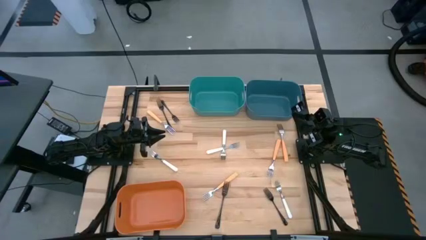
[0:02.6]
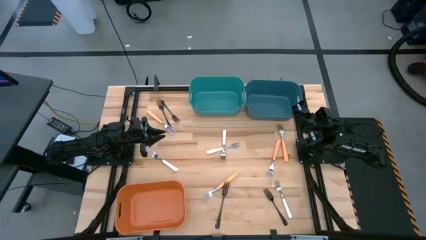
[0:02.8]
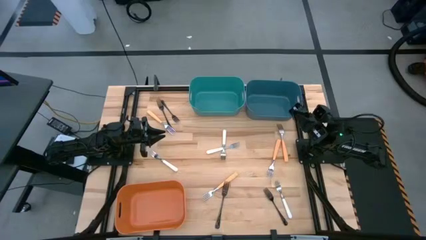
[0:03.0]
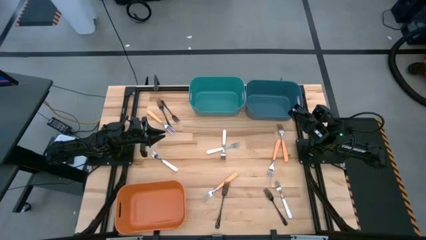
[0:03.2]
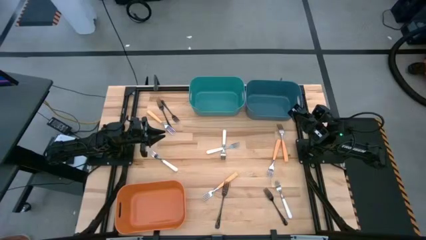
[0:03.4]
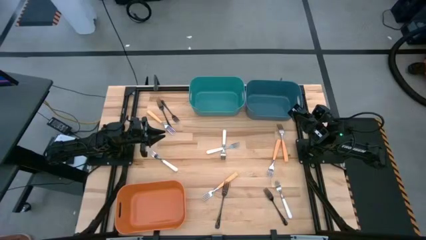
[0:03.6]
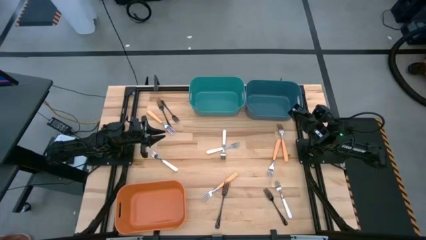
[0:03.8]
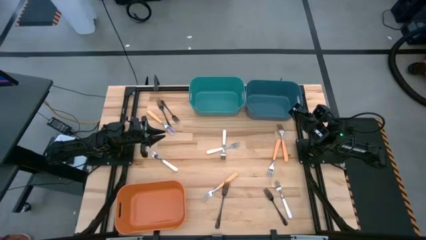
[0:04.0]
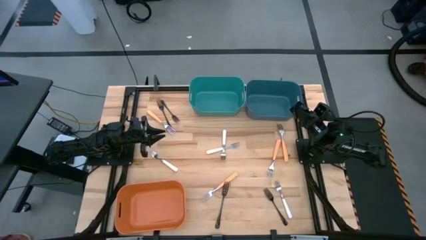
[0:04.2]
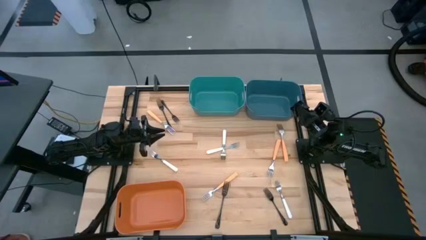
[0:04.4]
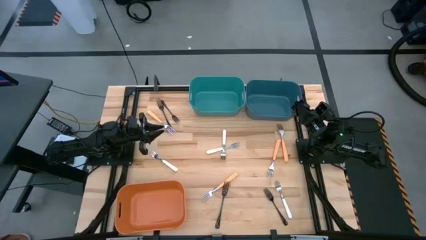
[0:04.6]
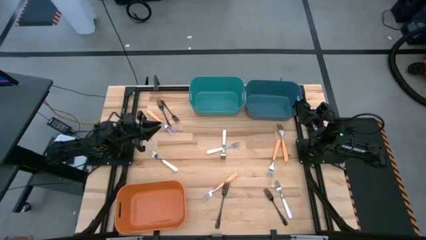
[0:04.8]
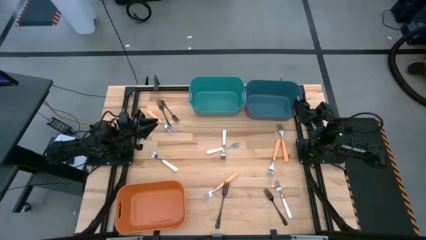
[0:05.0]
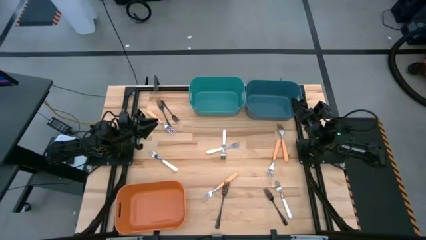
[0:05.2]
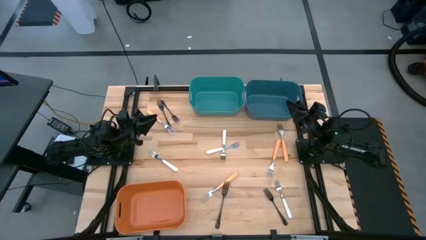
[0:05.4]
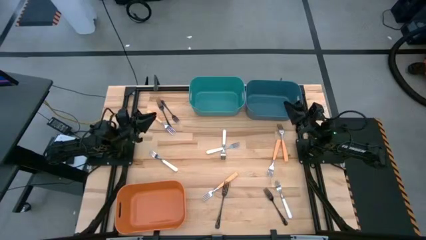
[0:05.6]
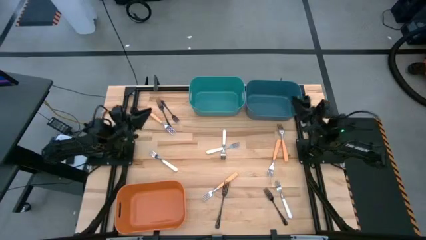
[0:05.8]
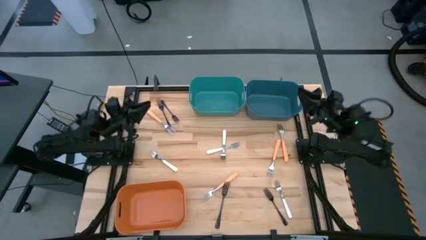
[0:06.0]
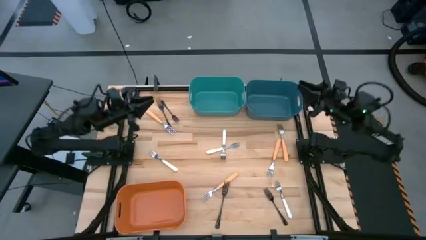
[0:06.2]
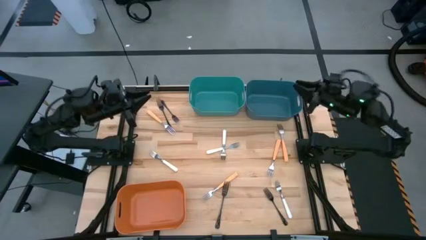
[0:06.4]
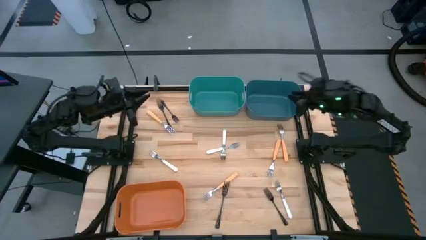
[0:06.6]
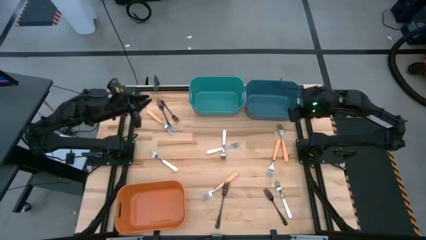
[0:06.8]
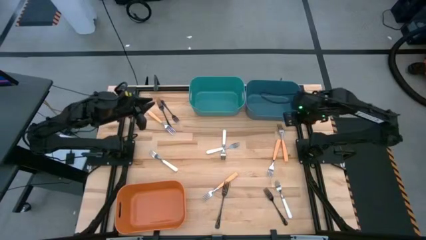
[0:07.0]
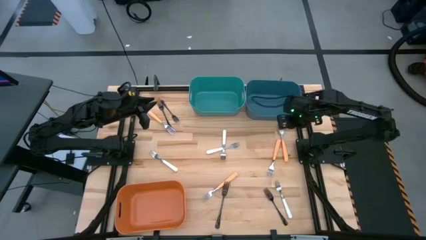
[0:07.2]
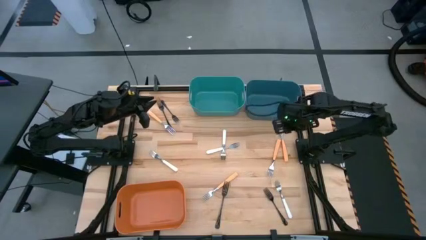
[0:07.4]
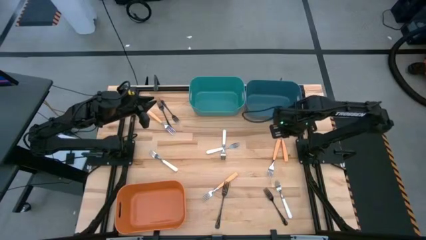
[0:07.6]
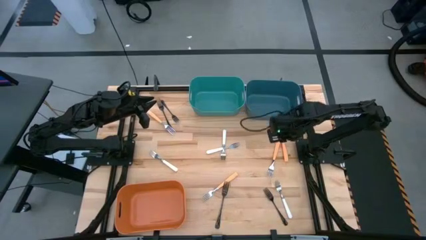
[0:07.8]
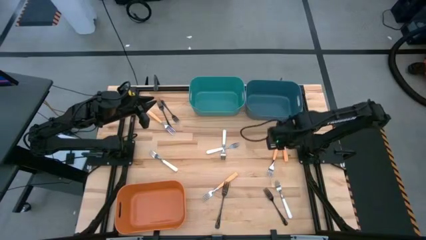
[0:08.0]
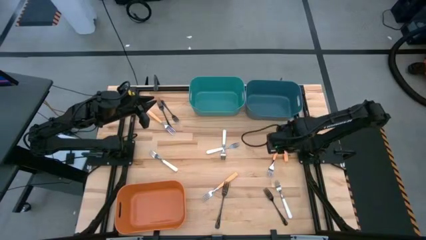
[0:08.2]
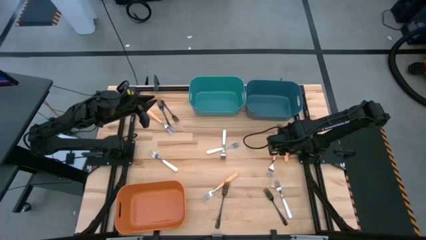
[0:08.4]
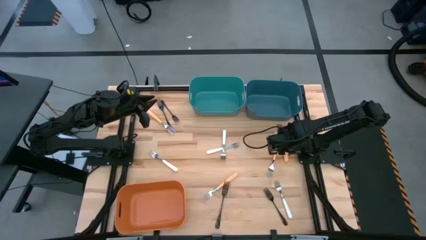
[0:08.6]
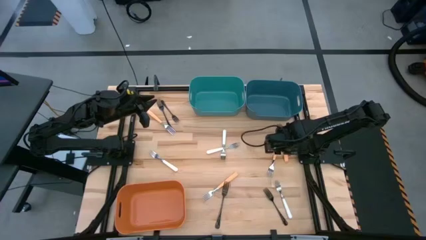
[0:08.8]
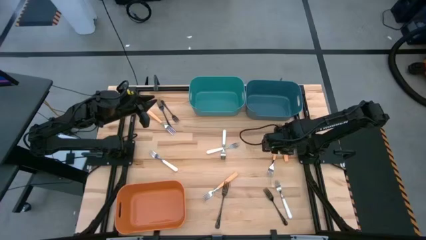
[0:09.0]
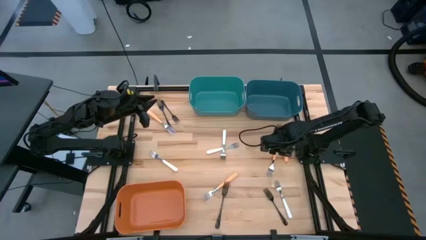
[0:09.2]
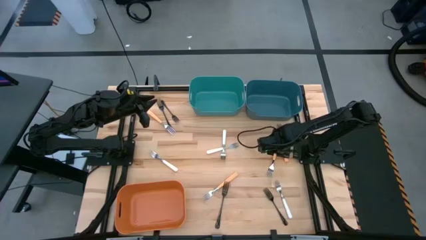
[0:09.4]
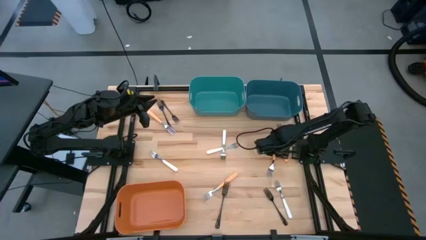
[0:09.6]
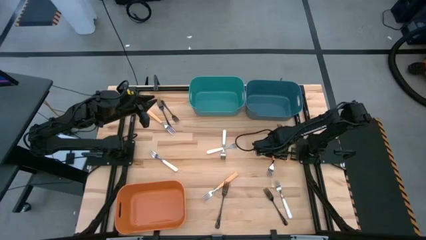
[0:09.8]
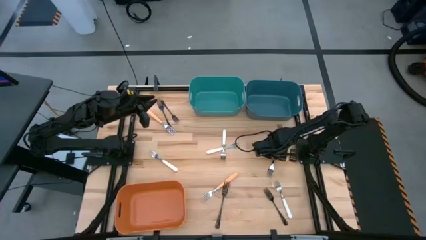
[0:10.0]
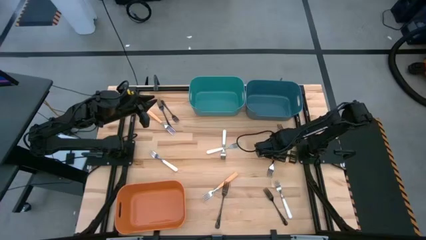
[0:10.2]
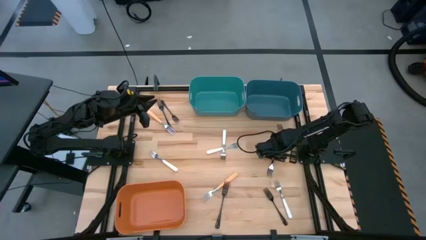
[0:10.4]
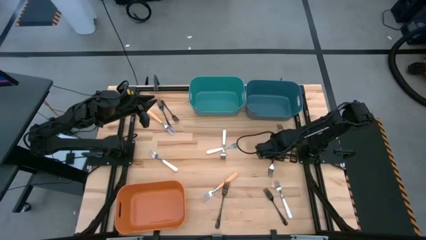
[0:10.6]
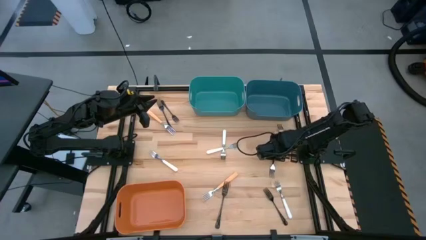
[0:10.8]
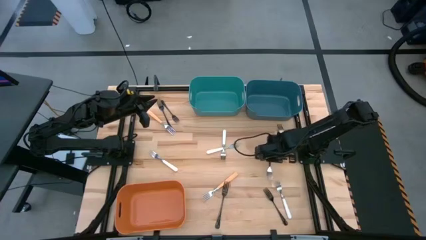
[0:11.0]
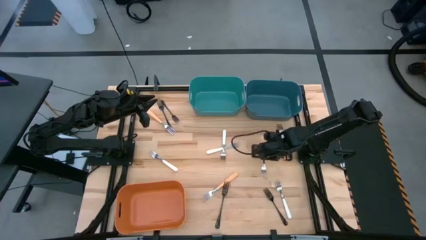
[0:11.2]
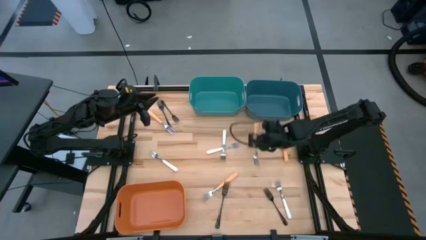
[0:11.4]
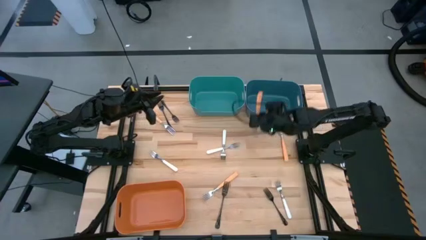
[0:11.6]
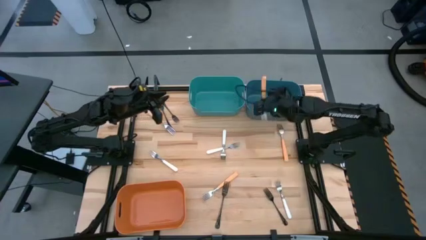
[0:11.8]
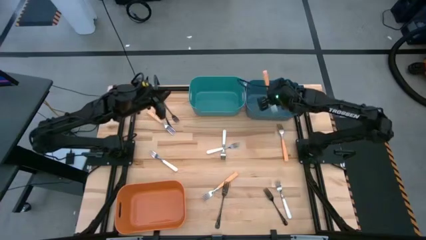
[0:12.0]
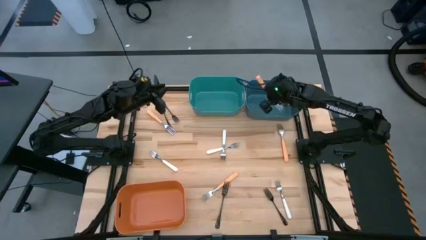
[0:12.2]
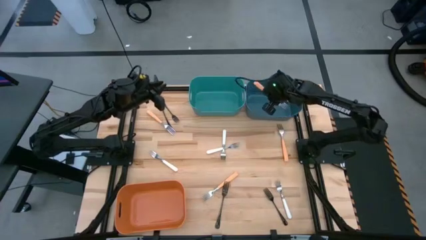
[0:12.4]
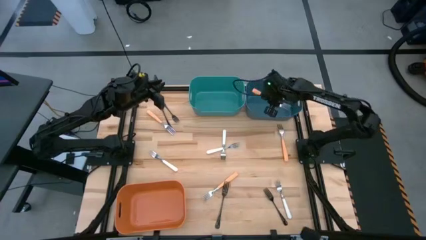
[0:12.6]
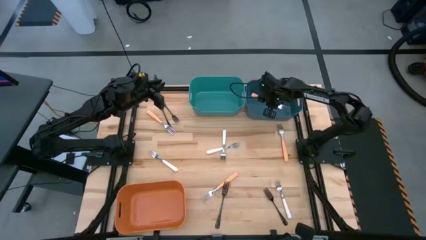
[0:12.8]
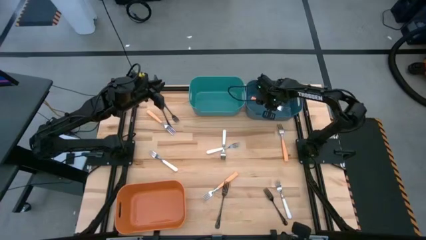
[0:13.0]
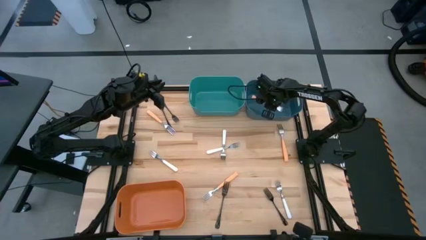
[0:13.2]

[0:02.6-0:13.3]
Task: Sort silverware by color (type)
Put the orange fork into the blue bin
